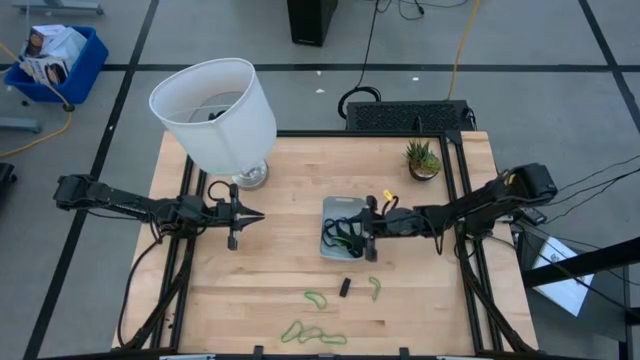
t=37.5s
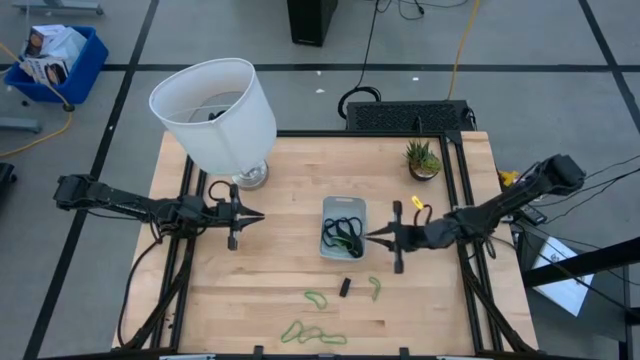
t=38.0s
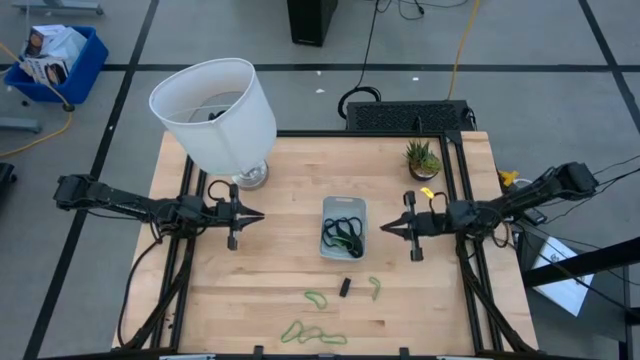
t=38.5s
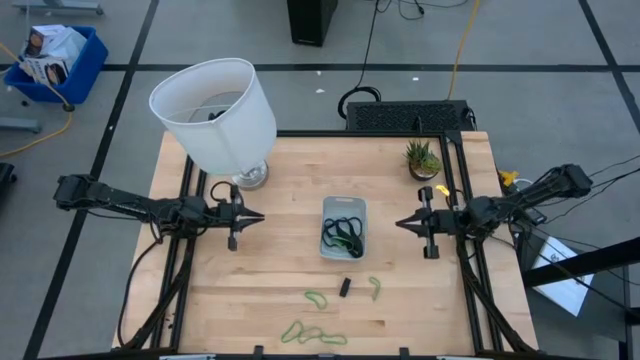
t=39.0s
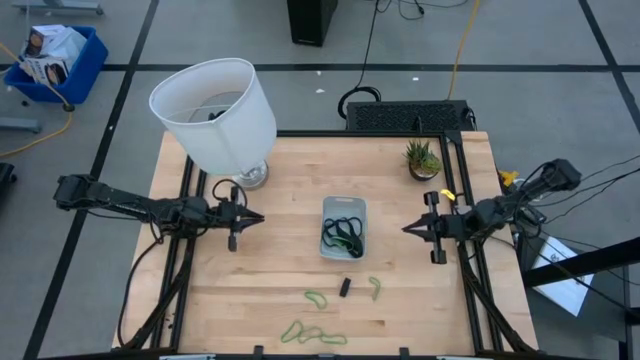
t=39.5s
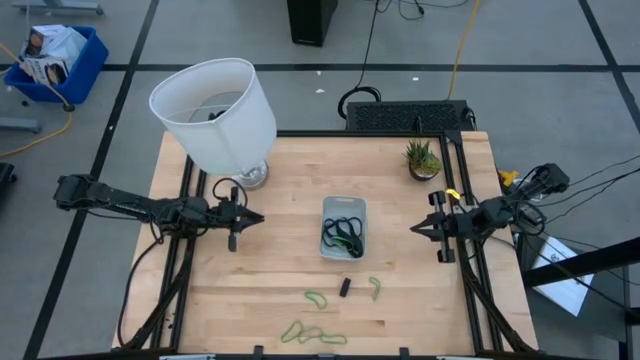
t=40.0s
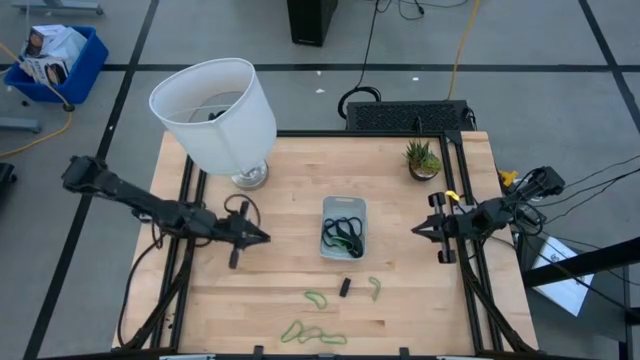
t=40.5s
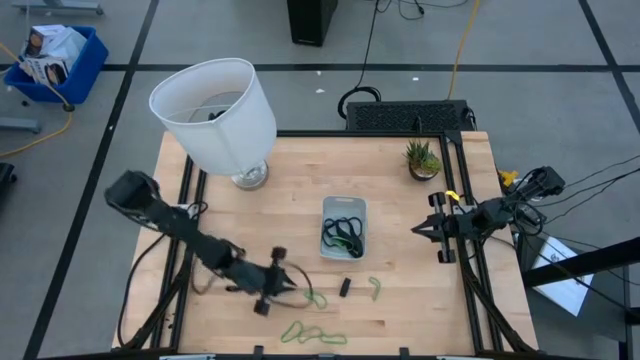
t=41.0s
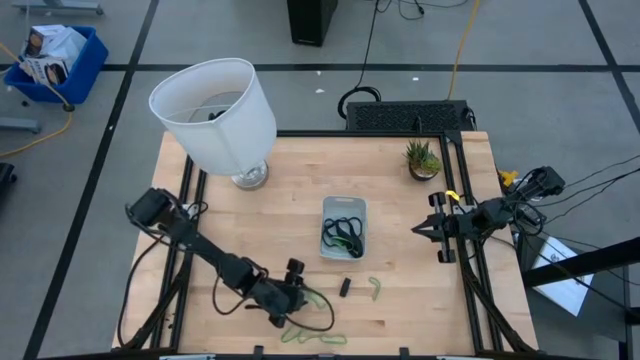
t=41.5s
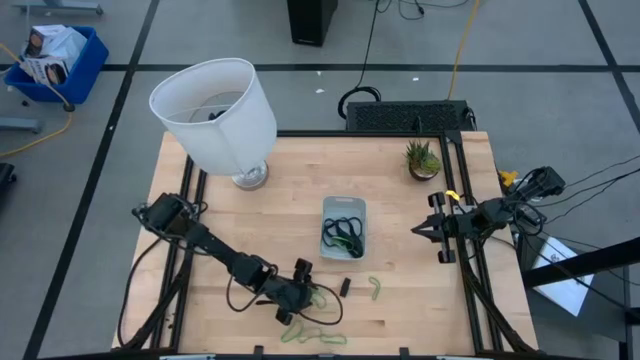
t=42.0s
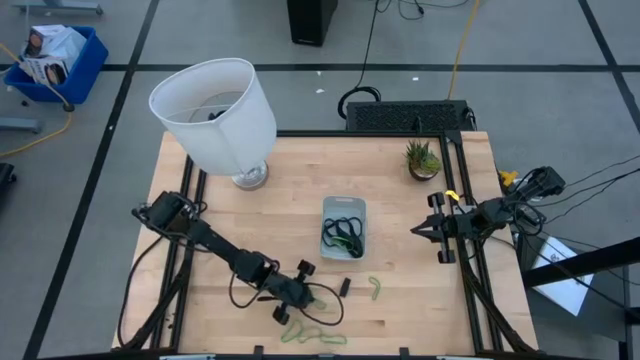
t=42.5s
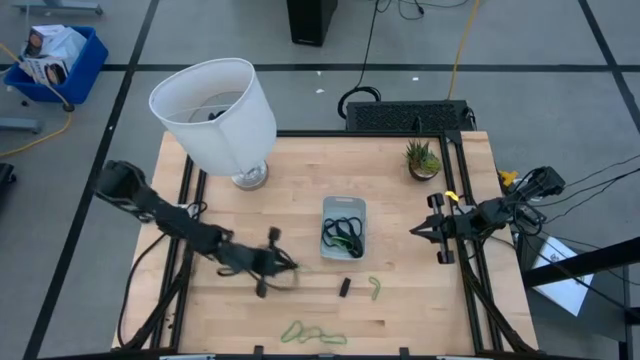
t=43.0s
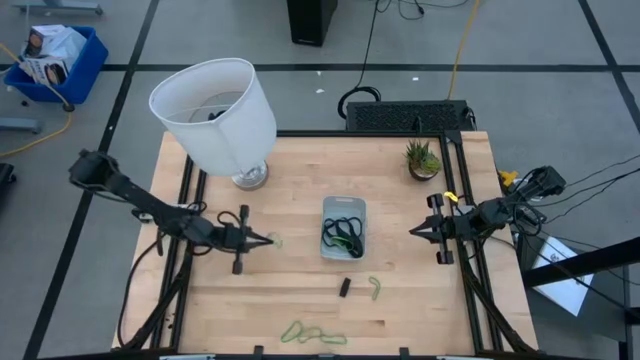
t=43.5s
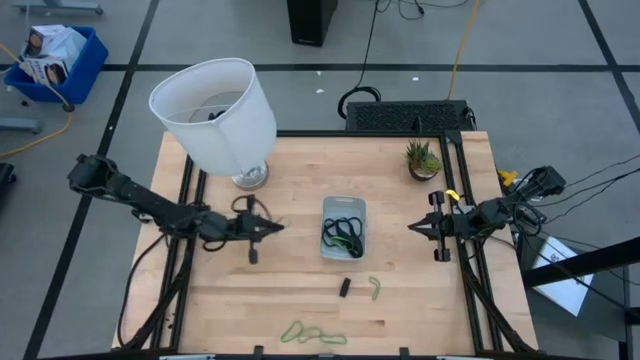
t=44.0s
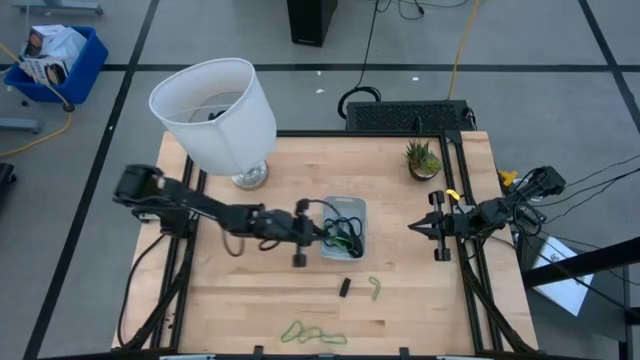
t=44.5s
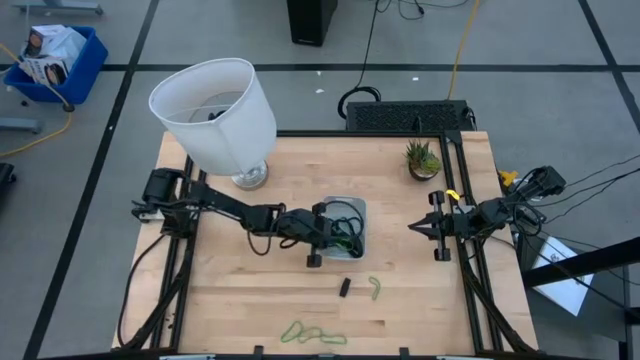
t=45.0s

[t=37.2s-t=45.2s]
Task: Pick and place rubber bands into bin
Put the green rubber band into the gray container

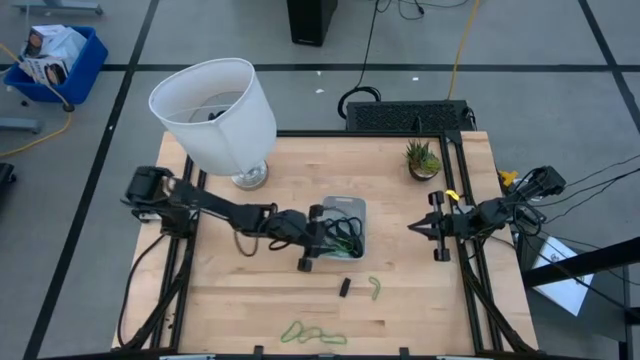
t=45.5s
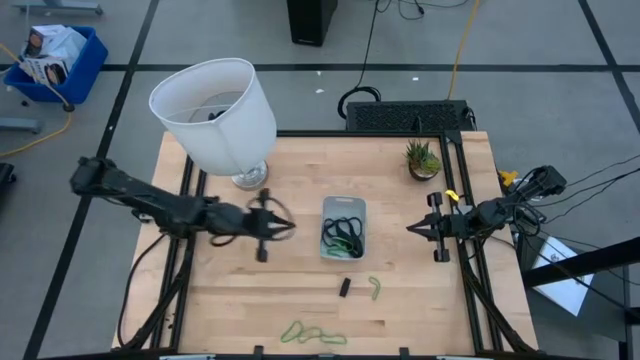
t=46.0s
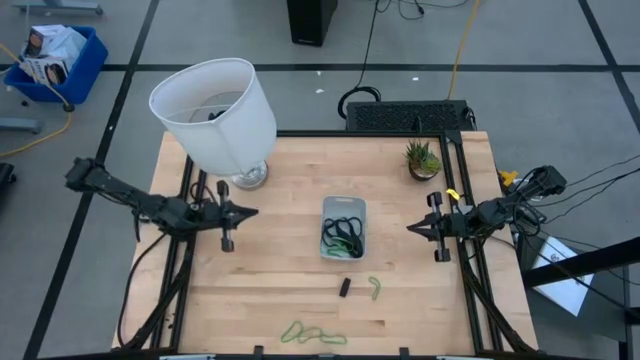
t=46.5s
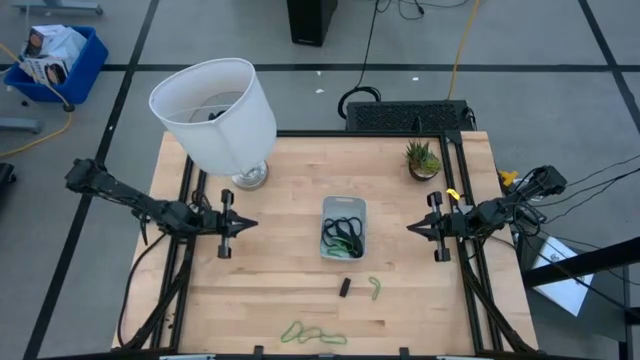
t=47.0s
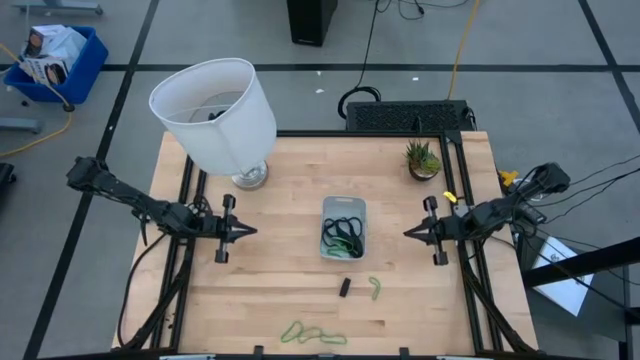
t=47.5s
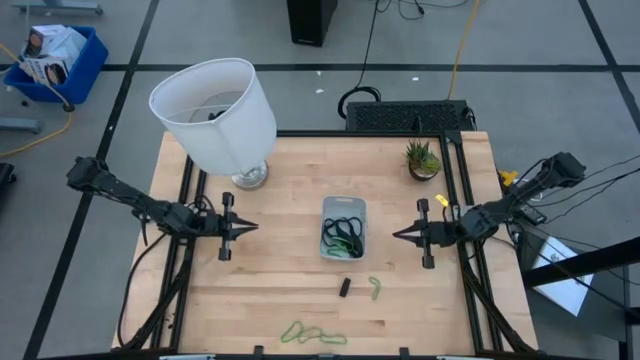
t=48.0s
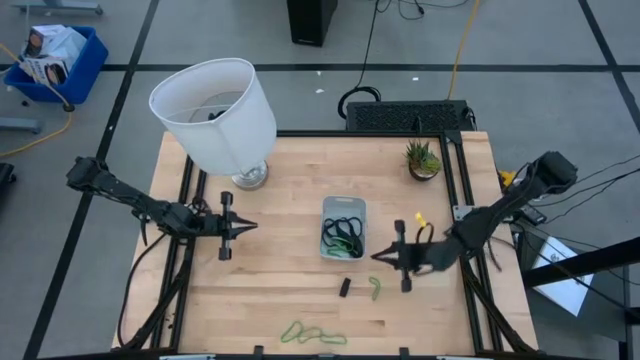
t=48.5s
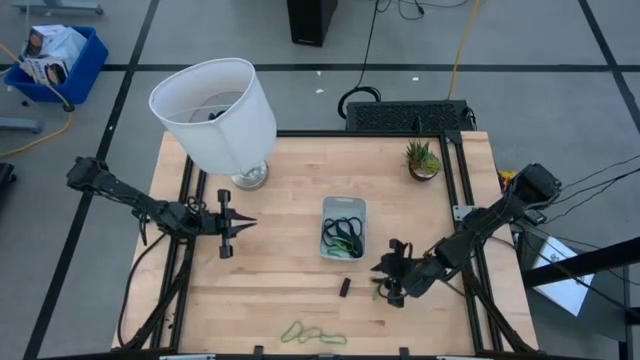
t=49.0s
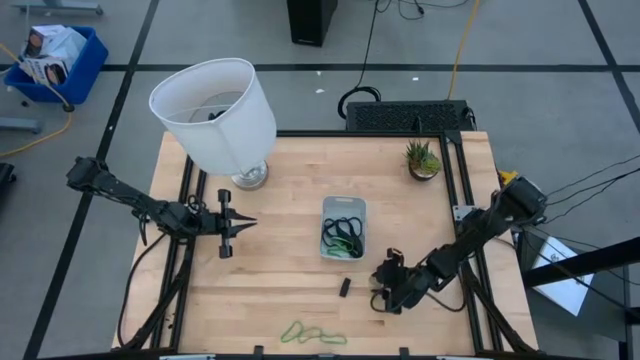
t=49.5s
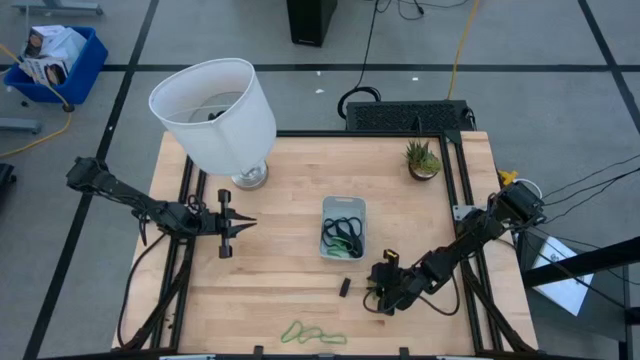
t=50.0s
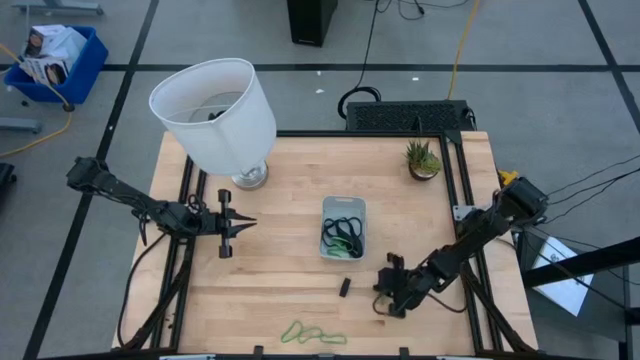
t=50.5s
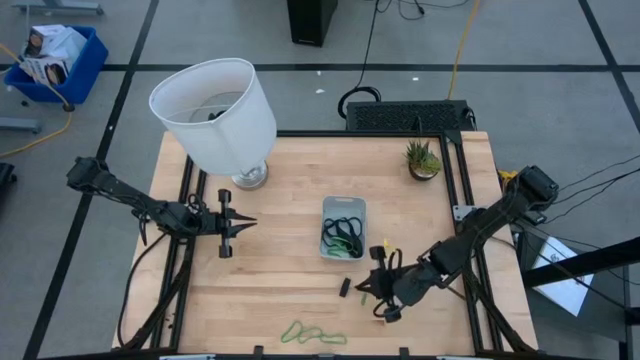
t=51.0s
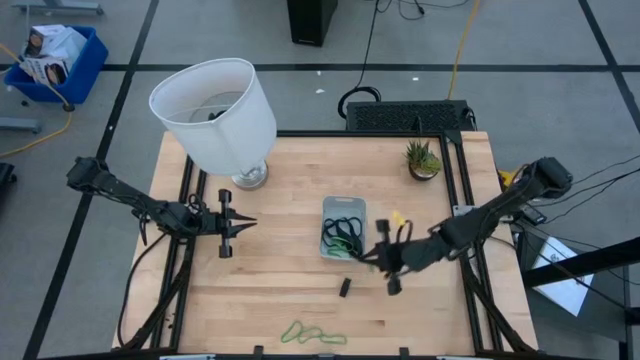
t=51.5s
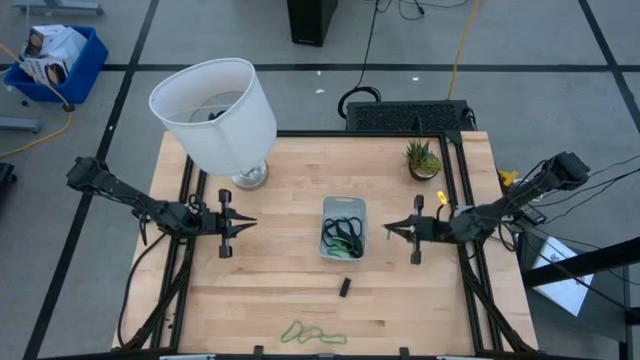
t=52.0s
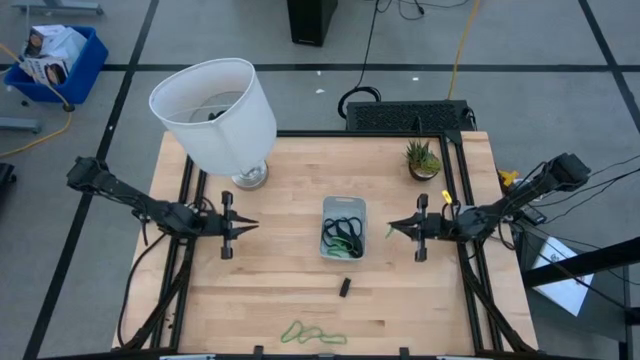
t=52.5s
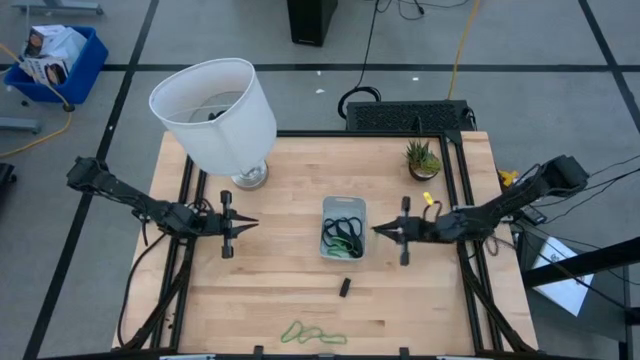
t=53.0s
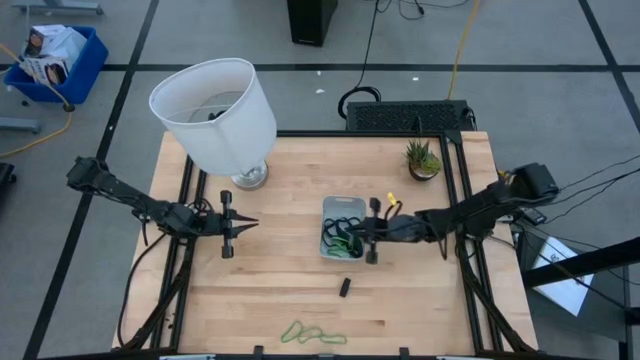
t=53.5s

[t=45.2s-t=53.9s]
Put the green rubber band into the gray container

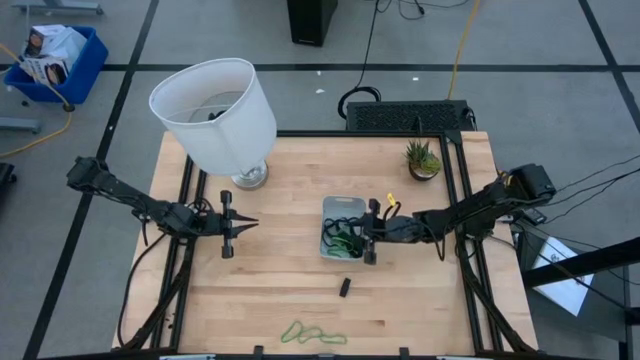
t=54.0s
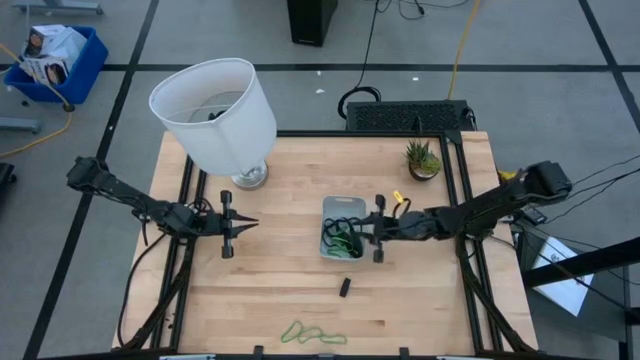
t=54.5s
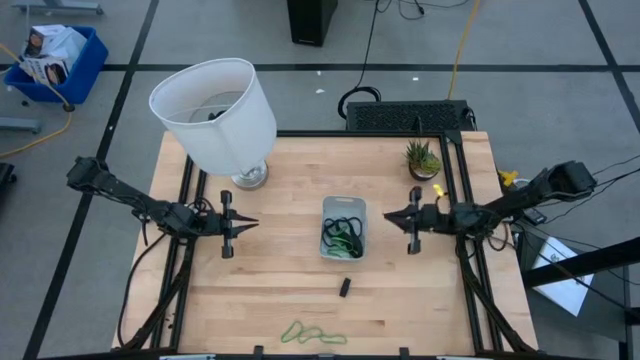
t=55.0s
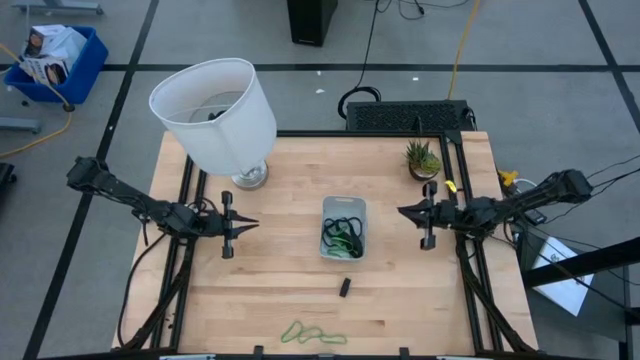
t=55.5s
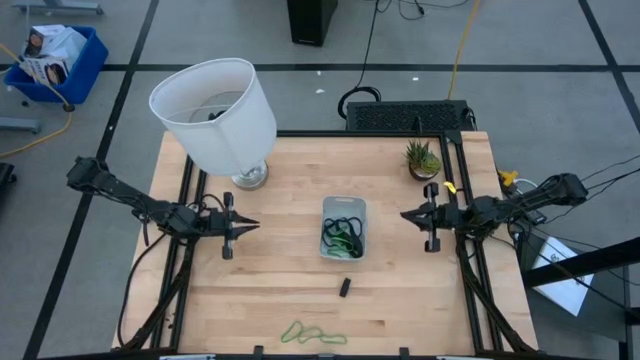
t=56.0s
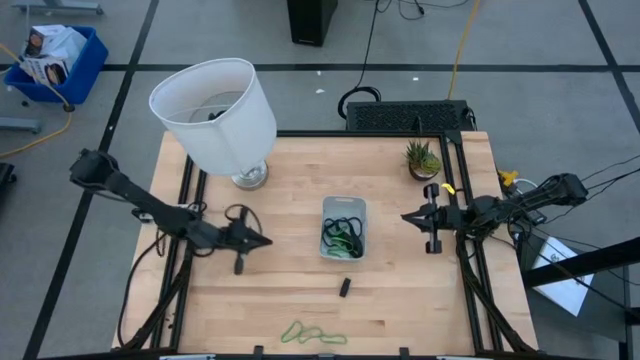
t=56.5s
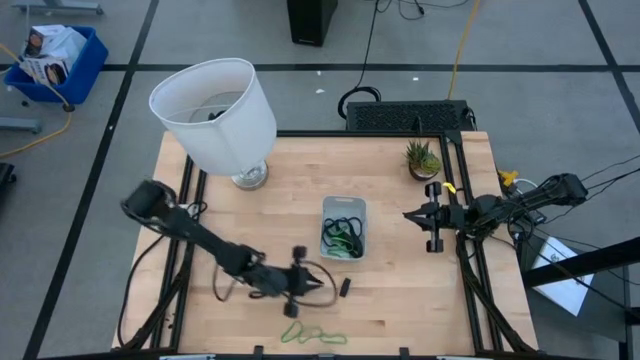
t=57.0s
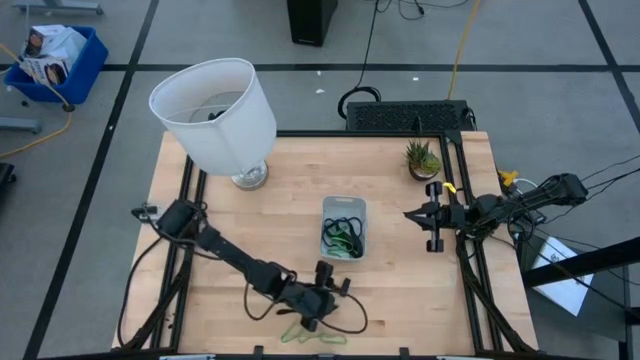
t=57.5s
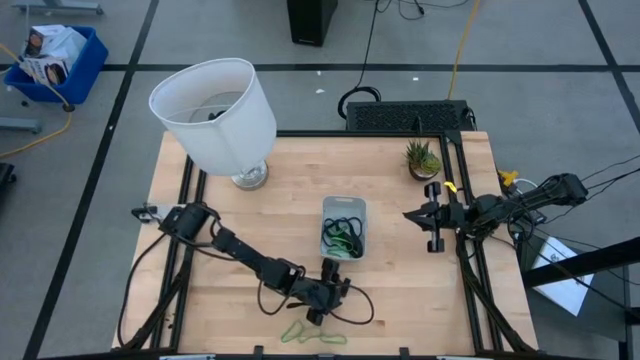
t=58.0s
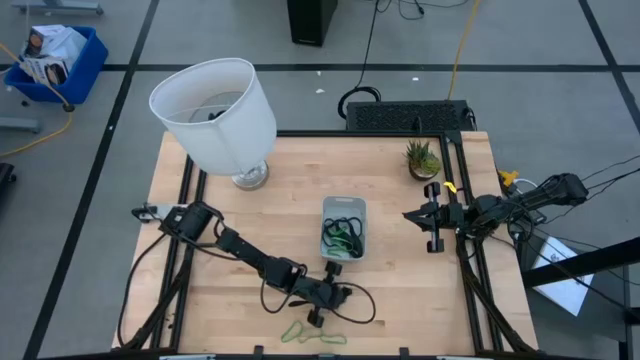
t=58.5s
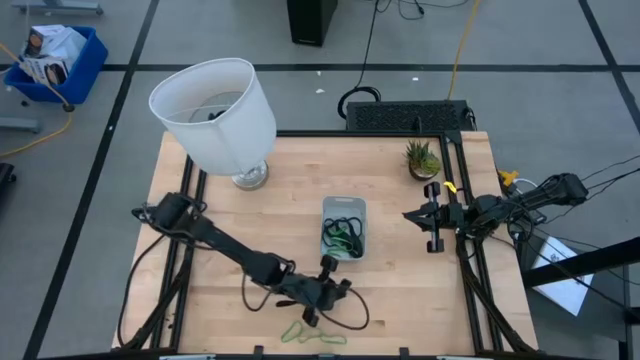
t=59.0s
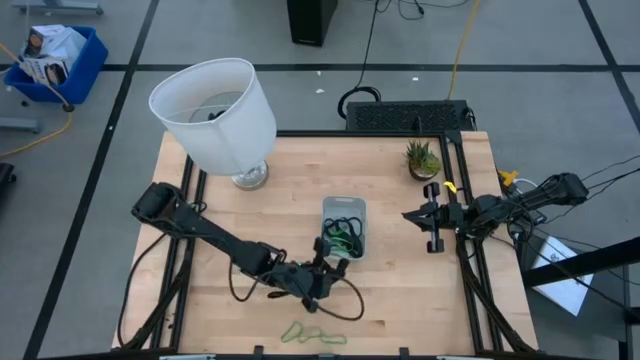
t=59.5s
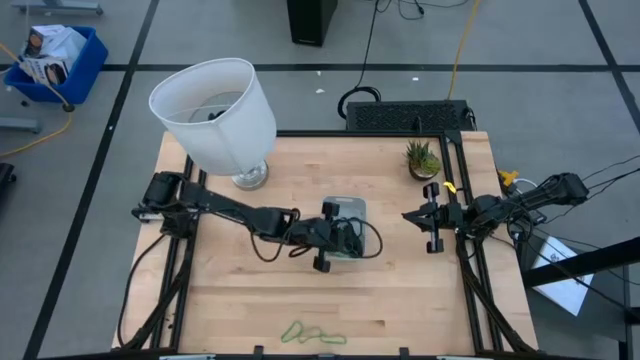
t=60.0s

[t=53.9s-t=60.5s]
Put the black rubber band into the gray container
